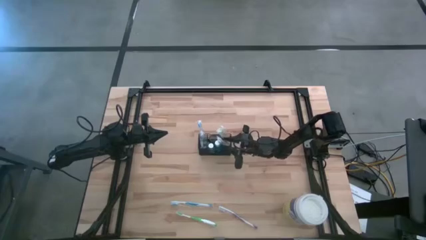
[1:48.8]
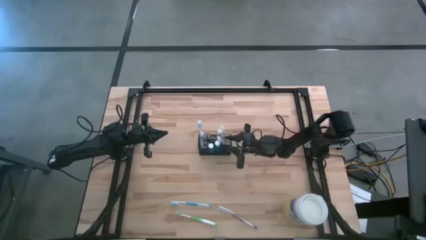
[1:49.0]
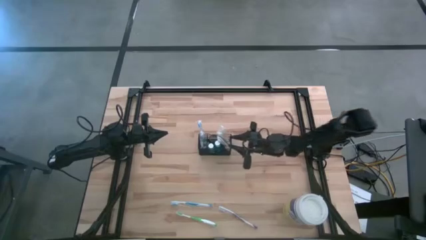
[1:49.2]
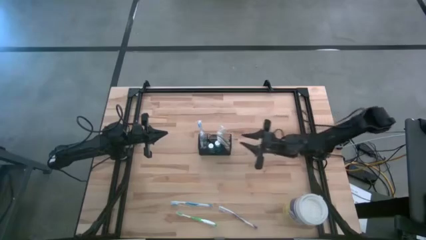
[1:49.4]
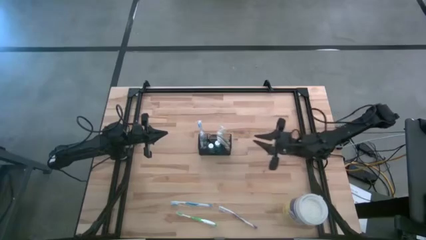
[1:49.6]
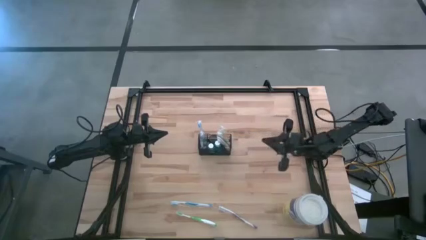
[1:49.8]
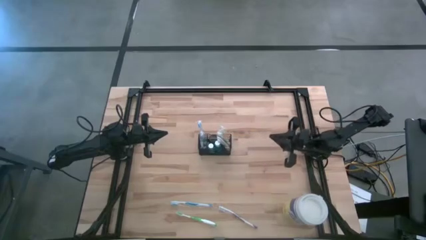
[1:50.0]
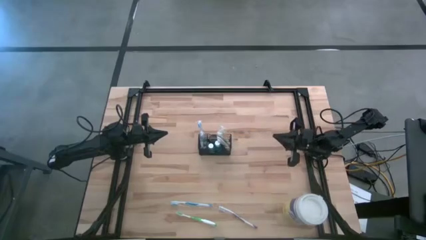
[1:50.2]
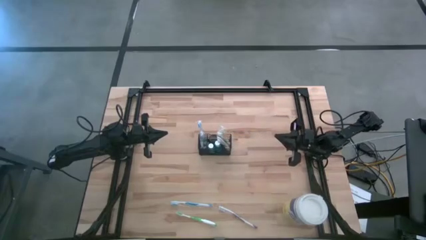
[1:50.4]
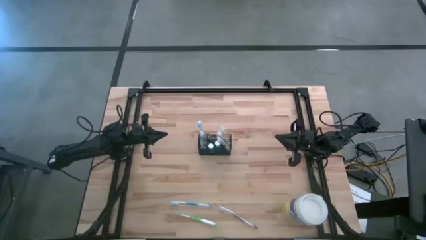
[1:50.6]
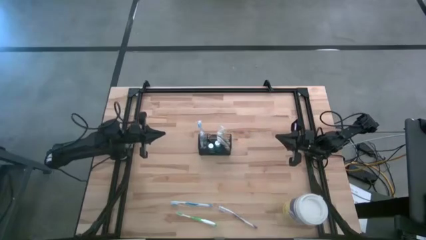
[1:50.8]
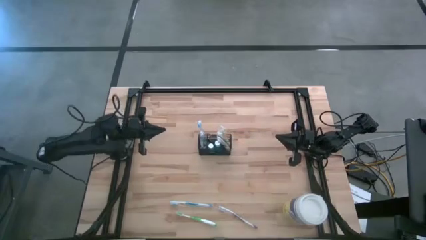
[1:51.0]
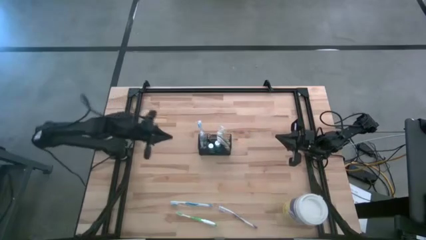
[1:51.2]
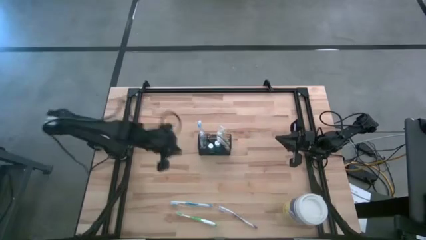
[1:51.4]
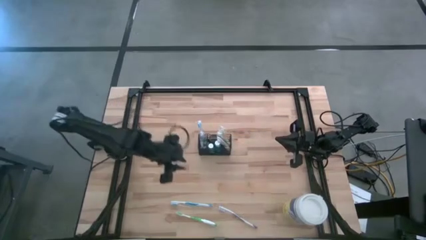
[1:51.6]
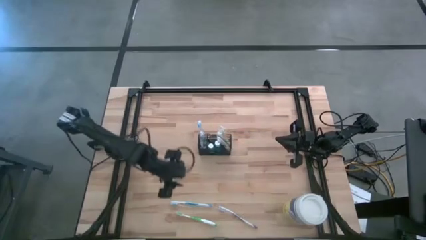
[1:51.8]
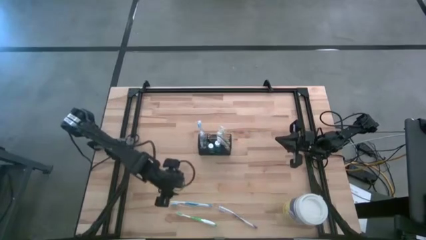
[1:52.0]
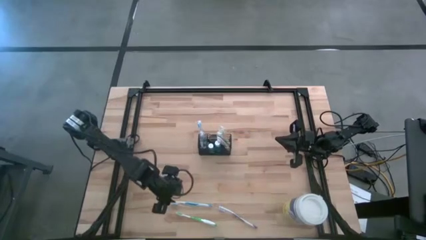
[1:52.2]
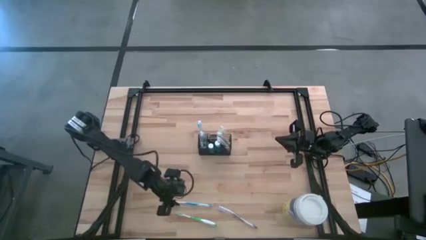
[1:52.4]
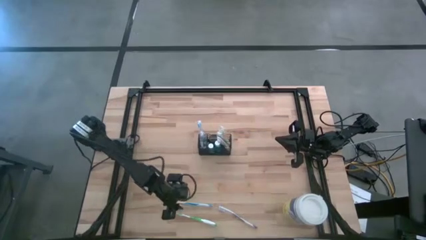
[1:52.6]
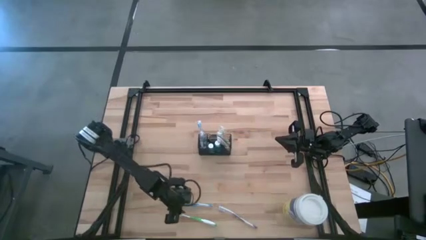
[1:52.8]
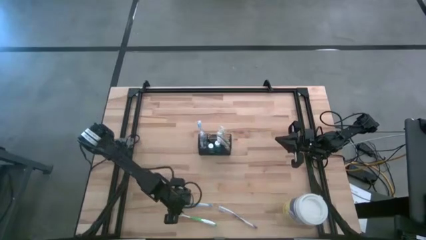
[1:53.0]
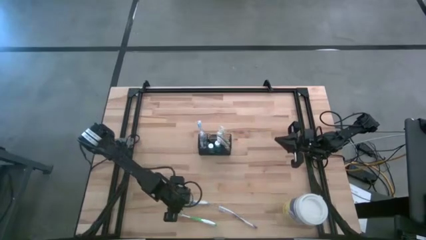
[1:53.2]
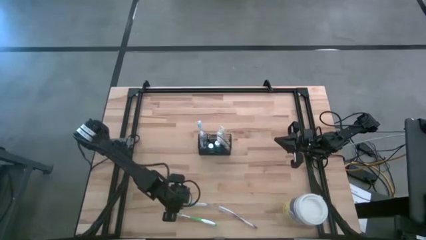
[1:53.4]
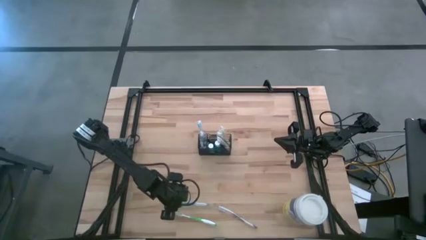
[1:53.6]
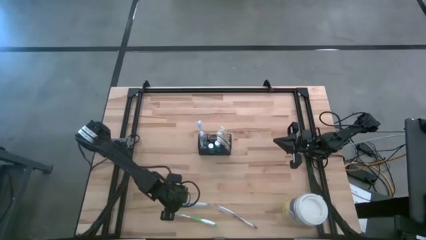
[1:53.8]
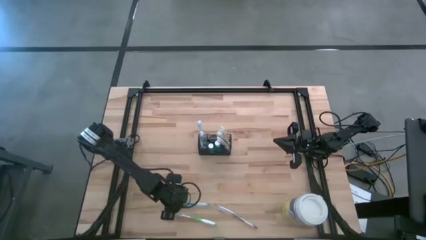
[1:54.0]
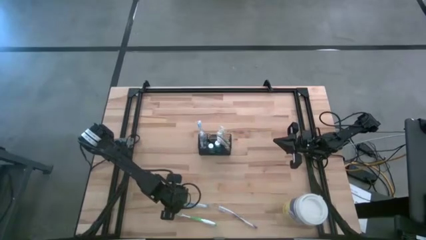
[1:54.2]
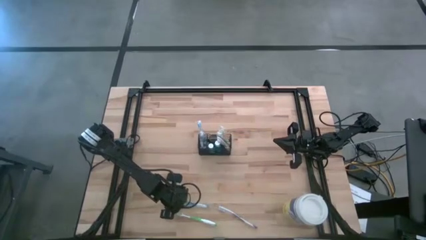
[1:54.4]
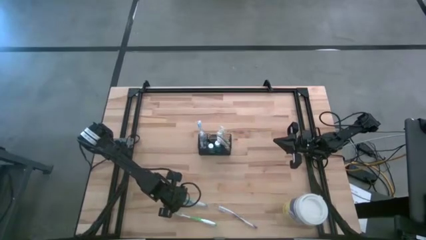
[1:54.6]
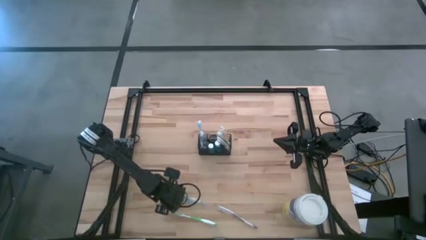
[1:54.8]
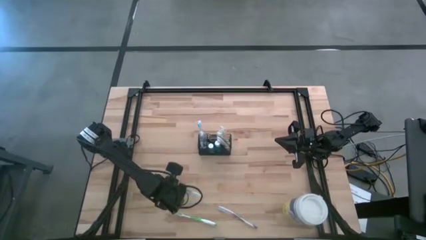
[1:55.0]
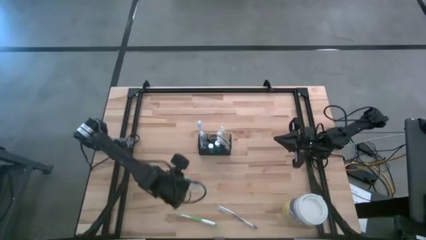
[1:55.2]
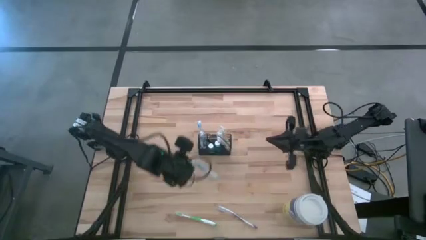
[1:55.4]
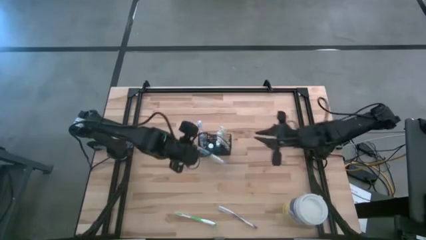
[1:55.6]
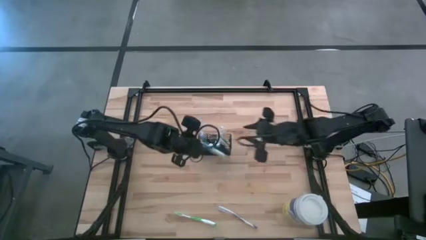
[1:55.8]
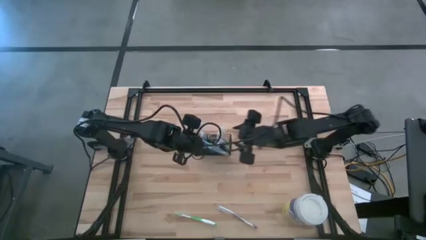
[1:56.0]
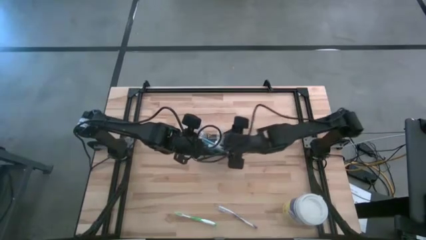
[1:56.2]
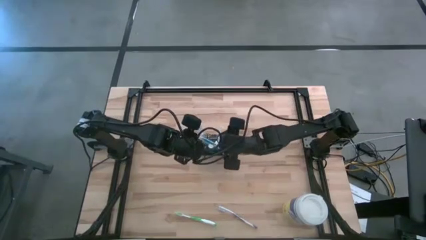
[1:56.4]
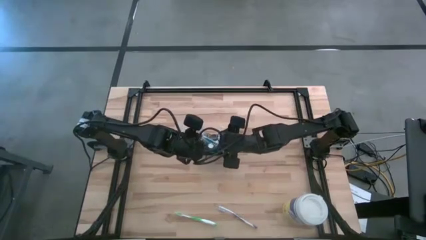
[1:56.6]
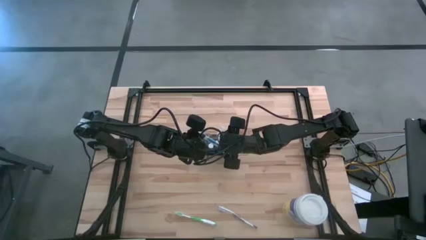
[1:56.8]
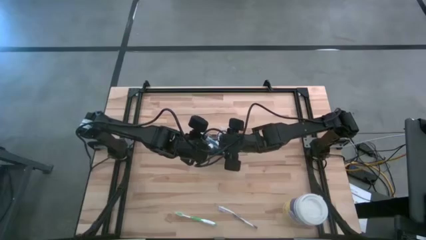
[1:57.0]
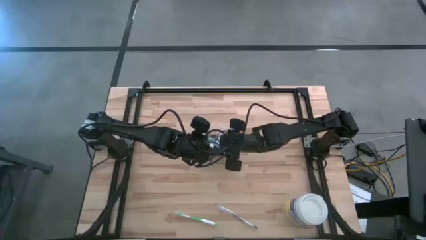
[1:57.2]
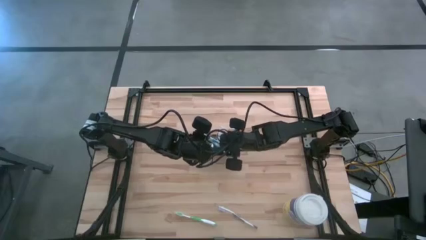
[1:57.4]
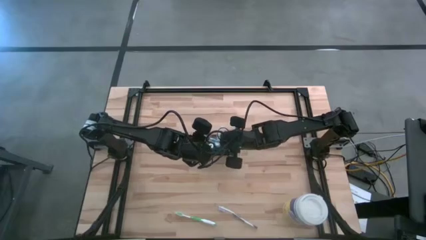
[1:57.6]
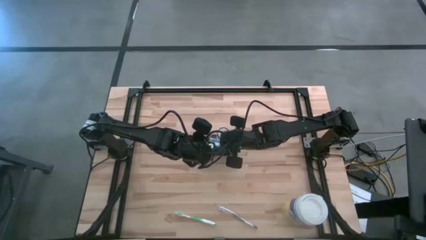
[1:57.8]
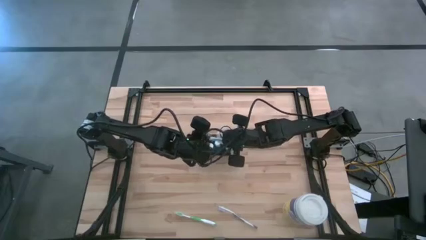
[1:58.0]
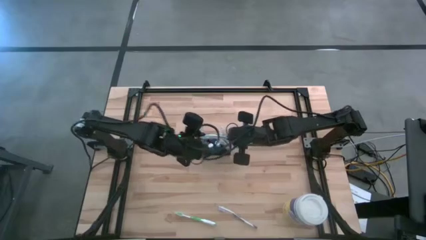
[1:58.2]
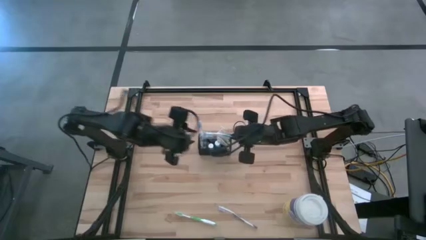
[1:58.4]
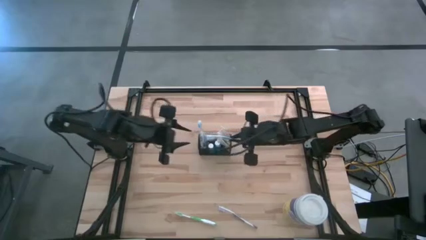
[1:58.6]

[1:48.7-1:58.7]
Task: Pick & Place toothbrushing station
Put the blue toothbrush into the black mesh organizer
